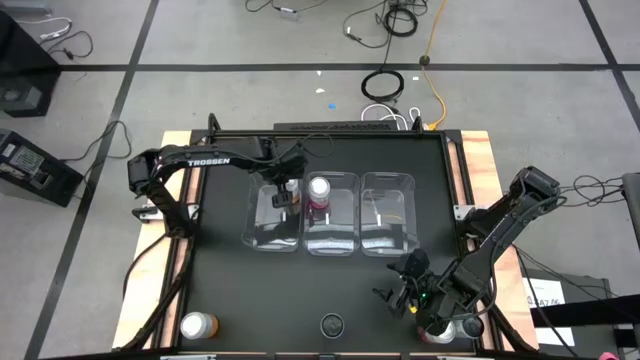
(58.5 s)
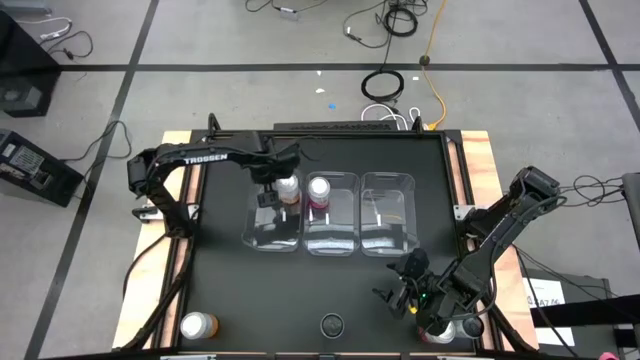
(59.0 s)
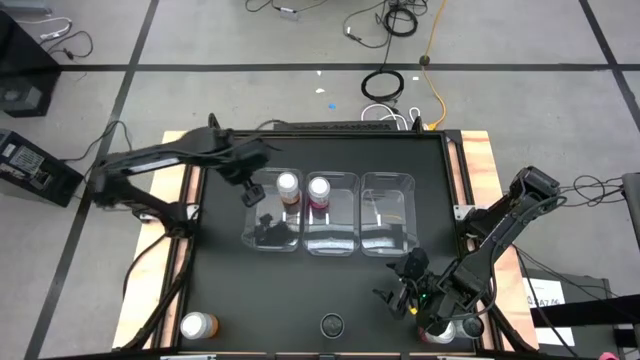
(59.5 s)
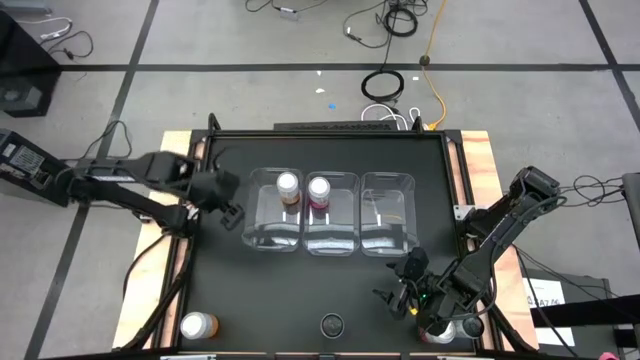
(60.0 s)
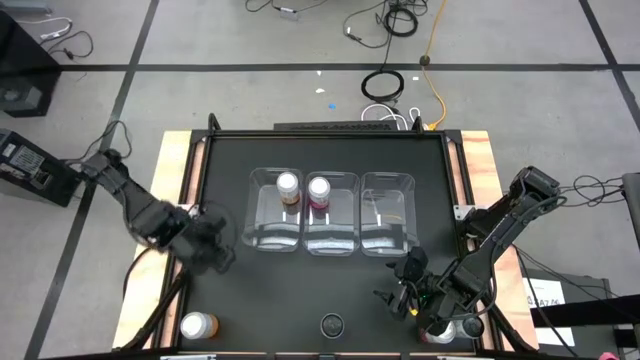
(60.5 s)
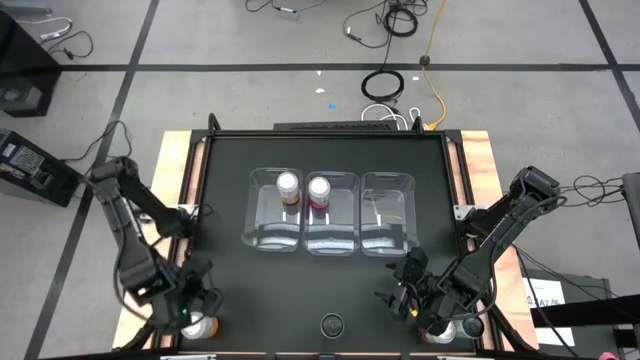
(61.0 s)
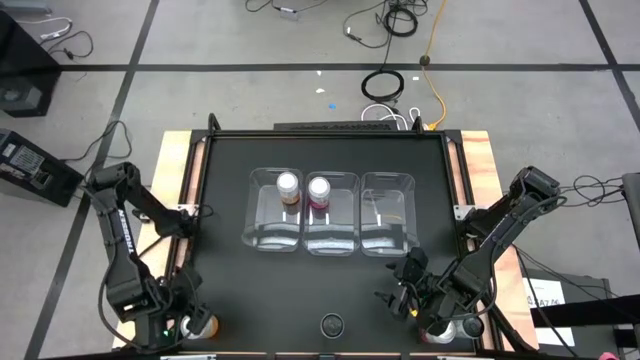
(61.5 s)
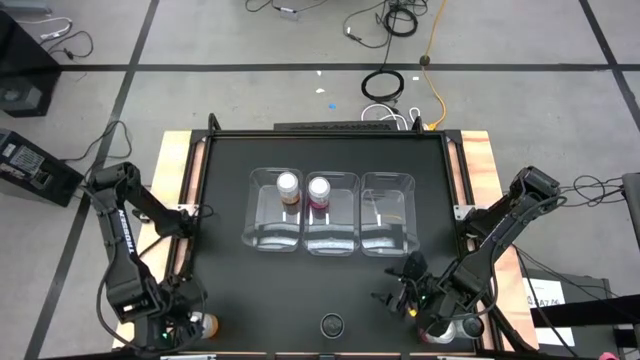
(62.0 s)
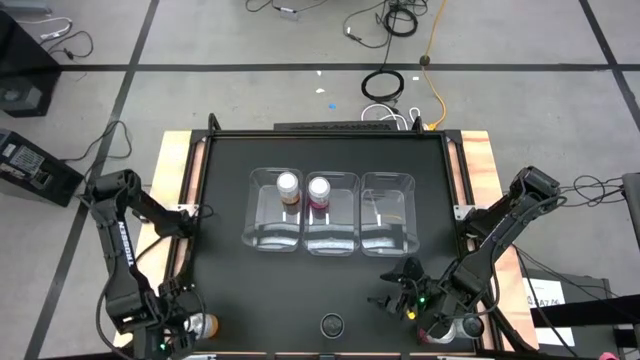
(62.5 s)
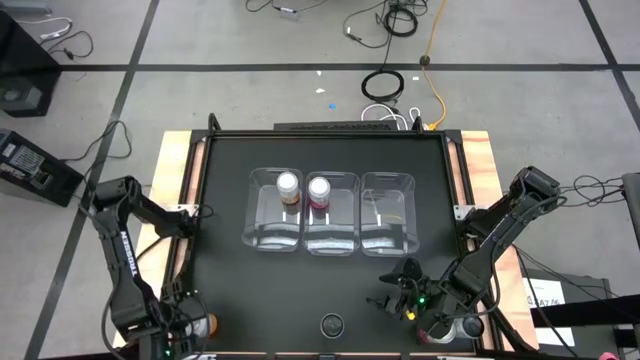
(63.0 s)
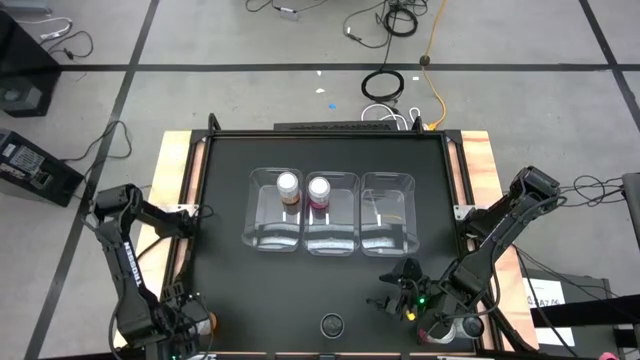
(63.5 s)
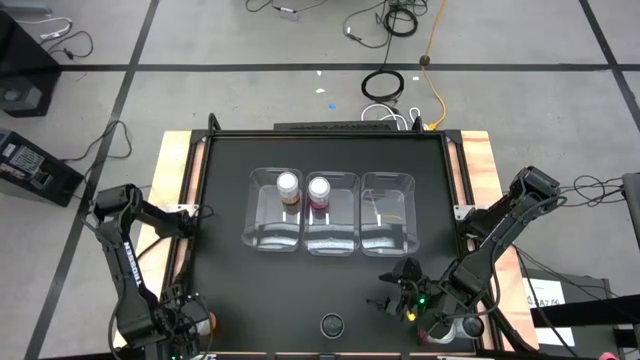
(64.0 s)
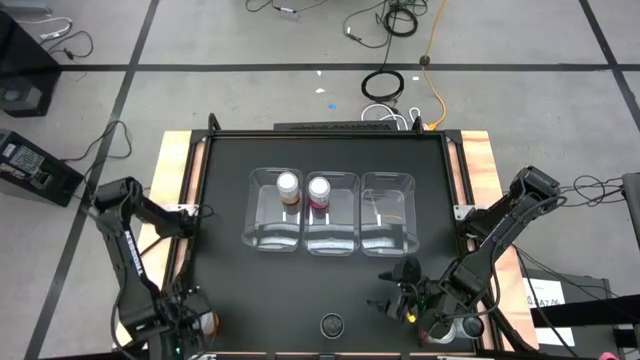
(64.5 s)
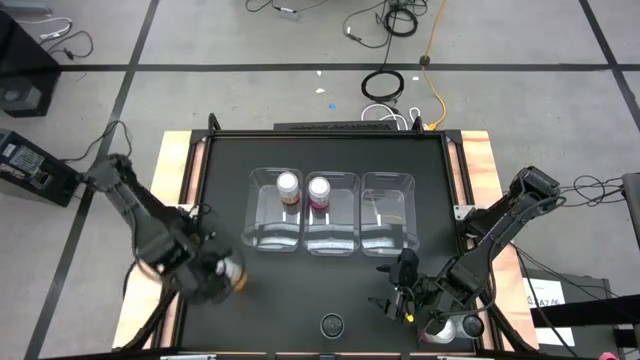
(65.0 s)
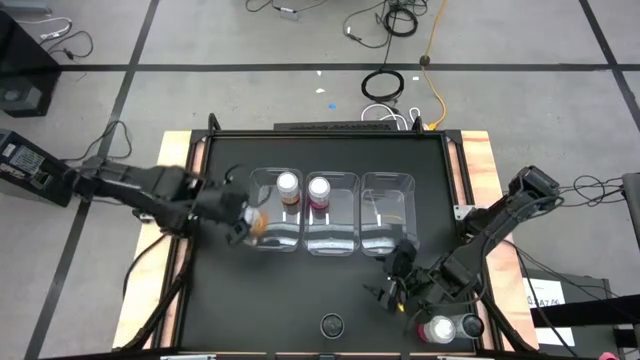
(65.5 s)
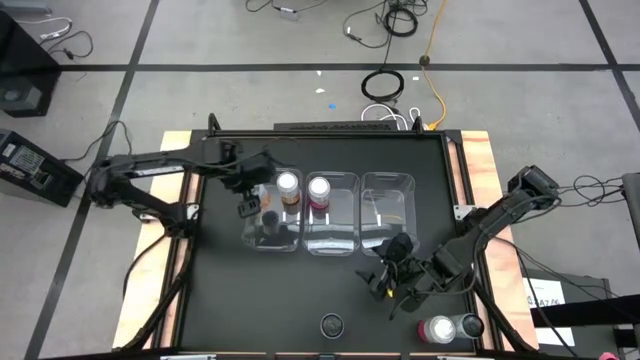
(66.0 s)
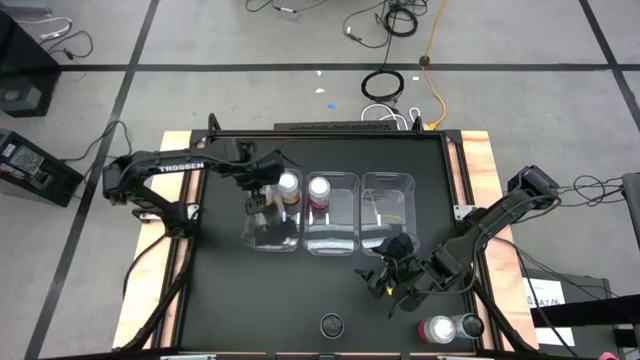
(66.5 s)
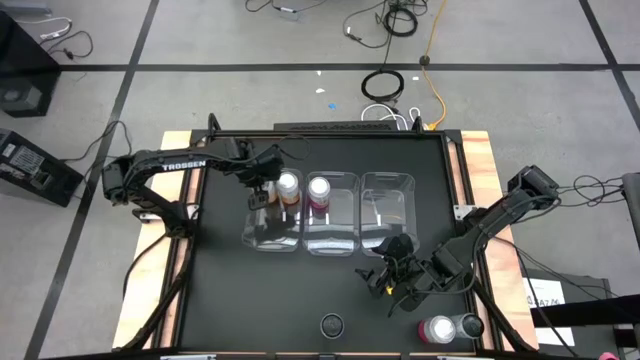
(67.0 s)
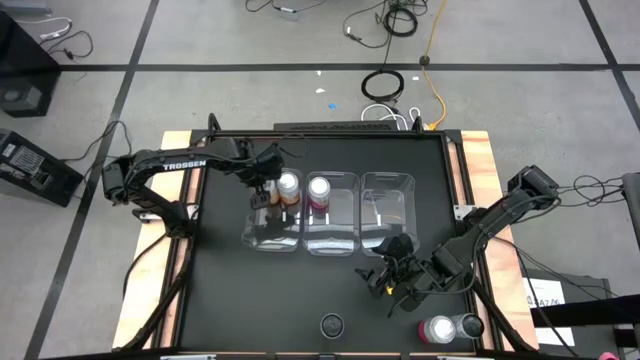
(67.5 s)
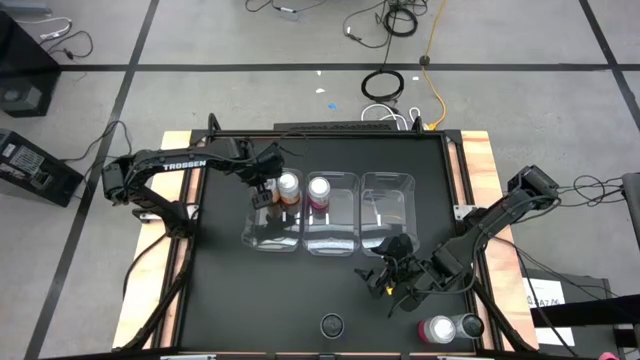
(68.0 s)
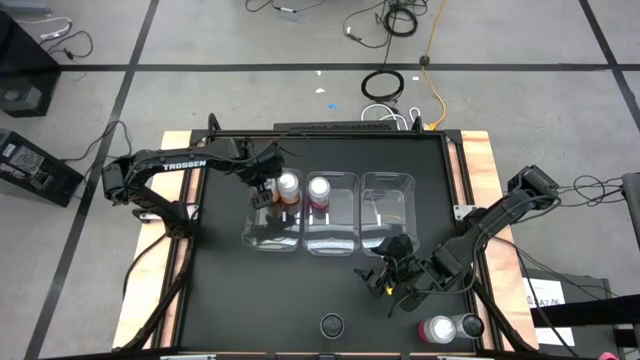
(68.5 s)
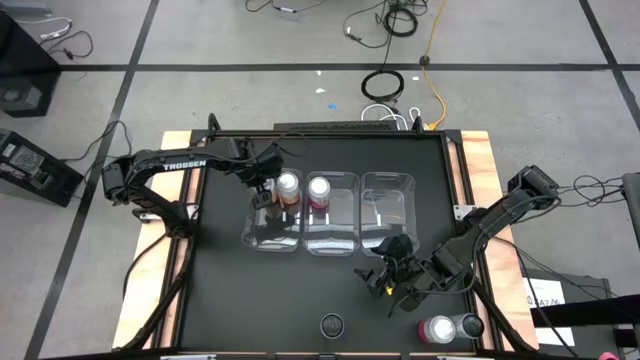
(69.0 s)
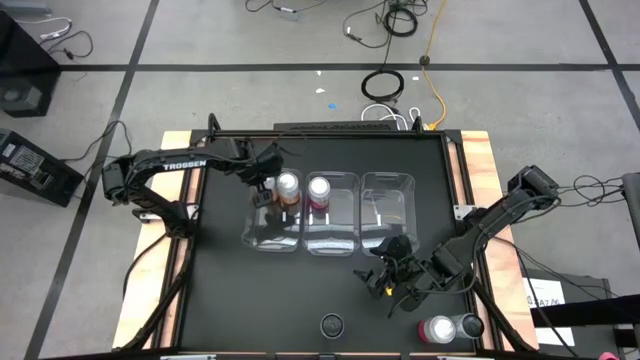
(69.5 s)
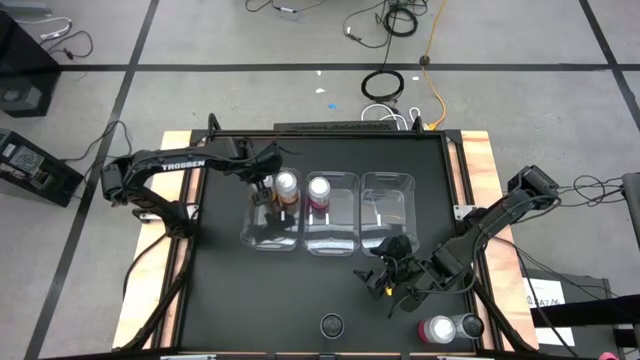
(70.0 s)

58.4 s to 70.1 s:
Task: Sort soda cans
Put the left yellow-white soda can into the middle left transparent bin

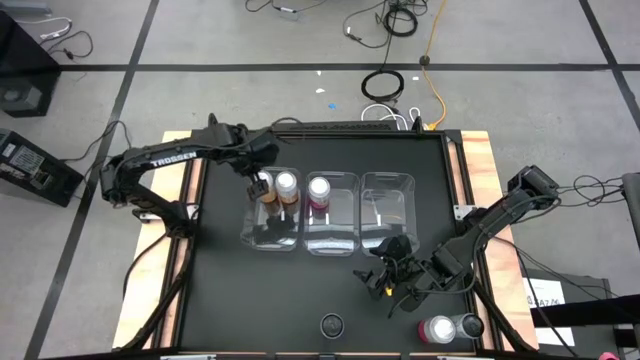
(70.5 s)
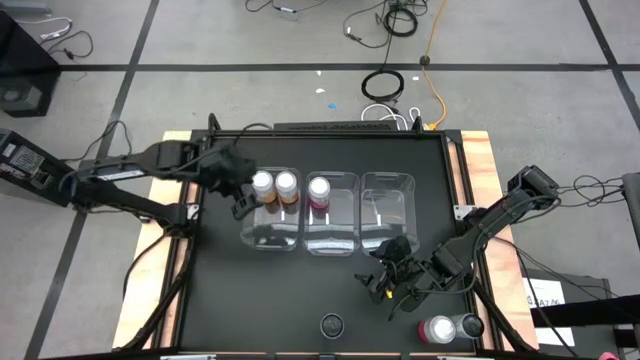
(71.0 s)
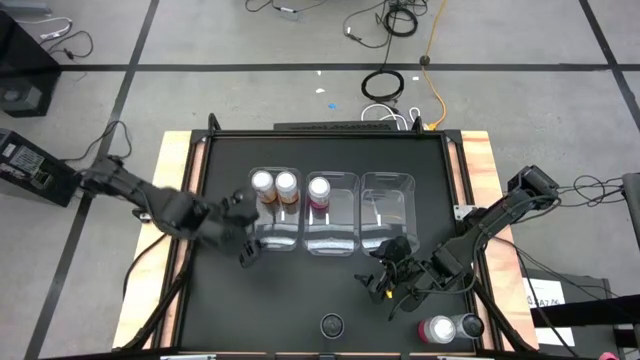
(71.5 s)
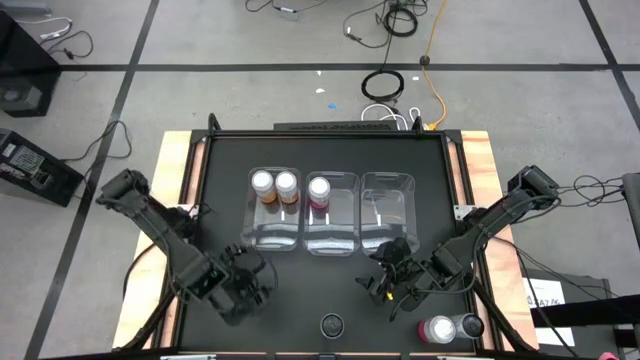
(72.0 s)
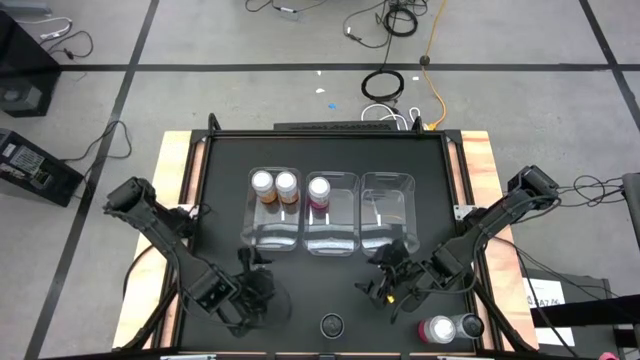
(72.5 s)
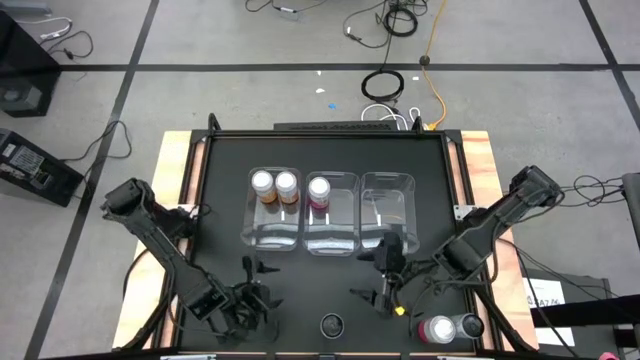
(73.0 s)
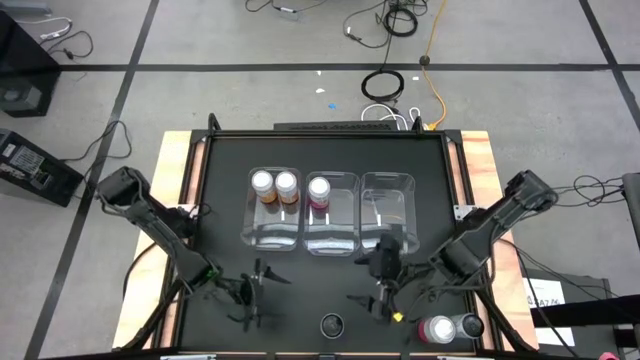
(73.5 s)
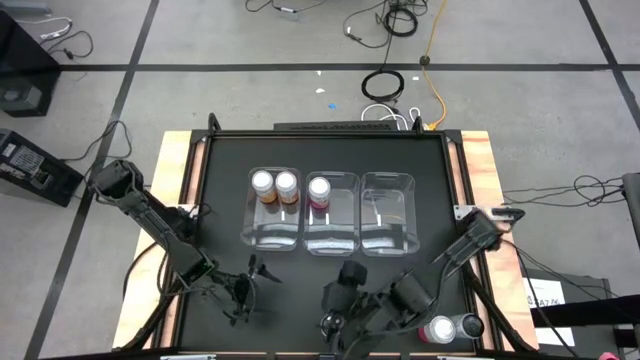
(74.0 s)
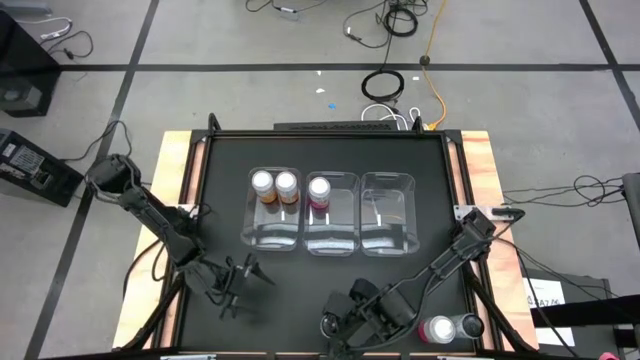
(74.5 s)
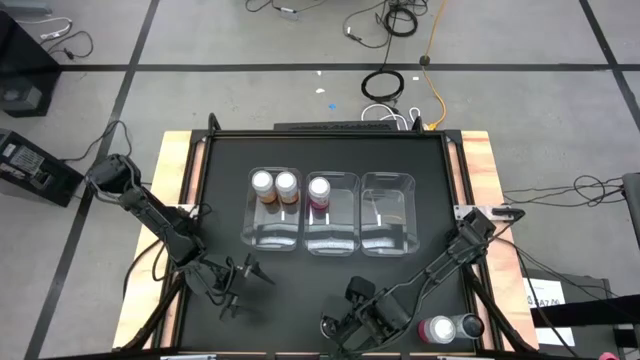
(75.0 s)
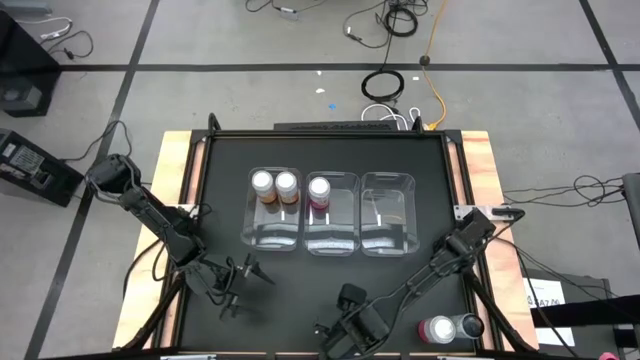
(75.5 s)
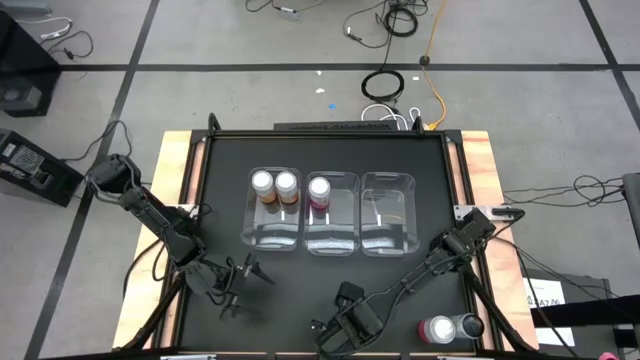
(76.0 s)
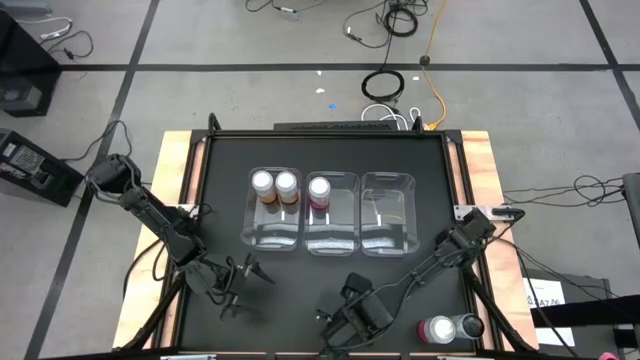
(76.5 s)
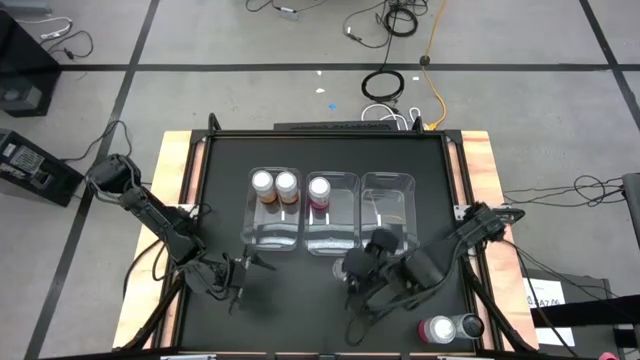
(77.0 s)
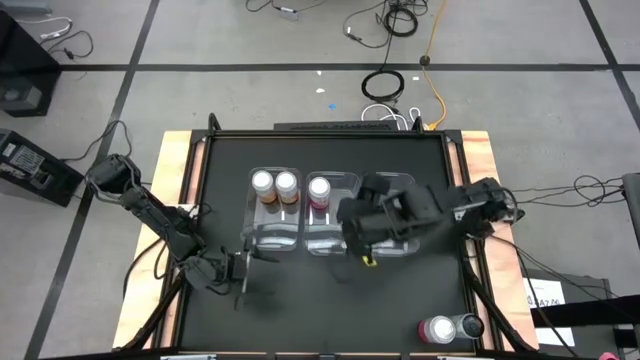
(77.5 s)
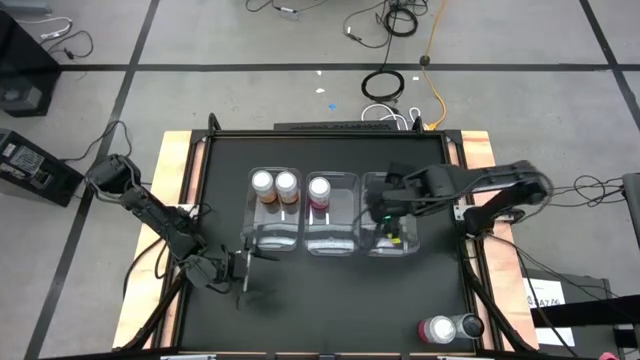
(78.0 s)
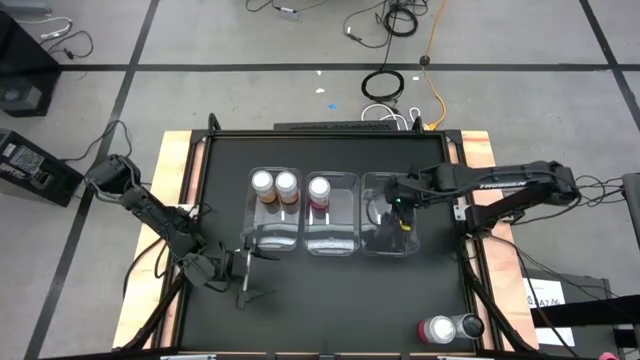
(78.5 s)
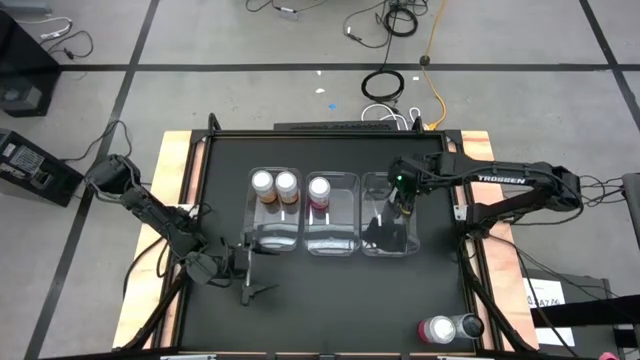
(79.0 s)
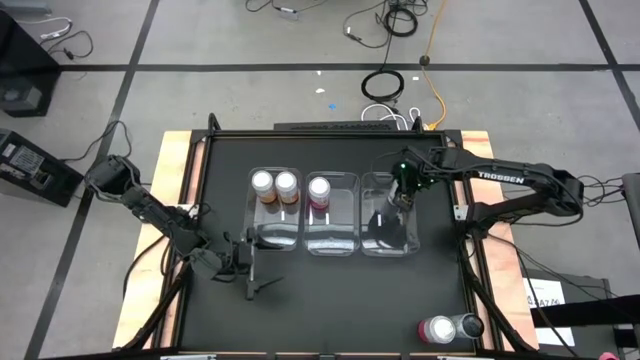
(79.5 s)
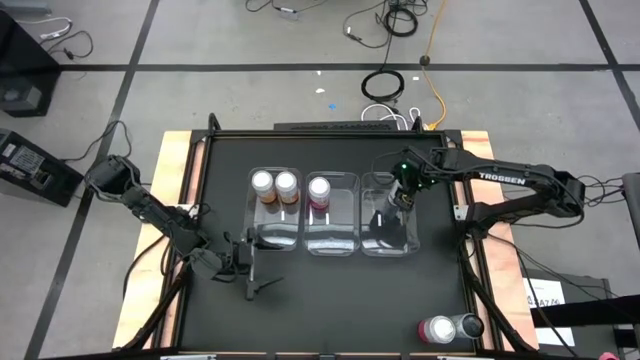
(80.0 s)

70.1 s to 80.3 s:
Put the left white-blue soda can into the middle right transparent bin
